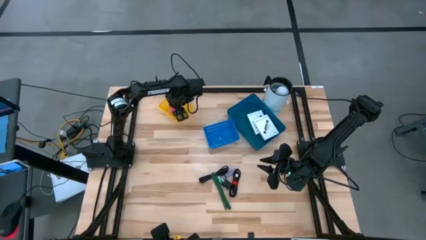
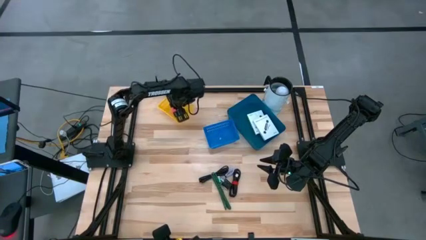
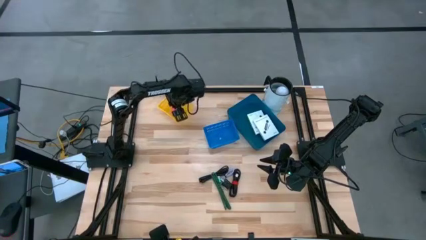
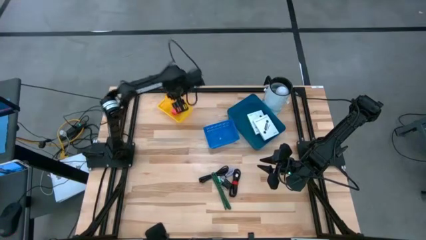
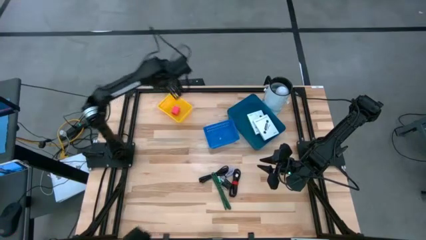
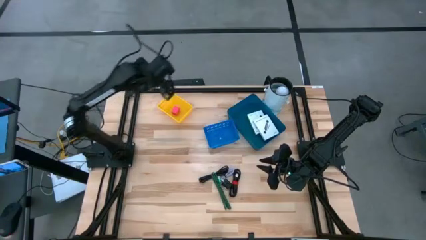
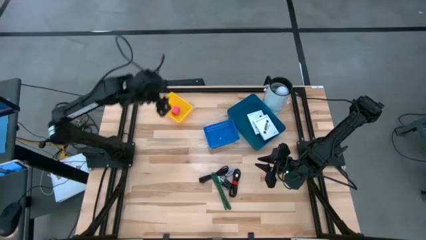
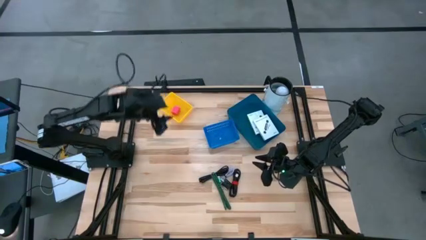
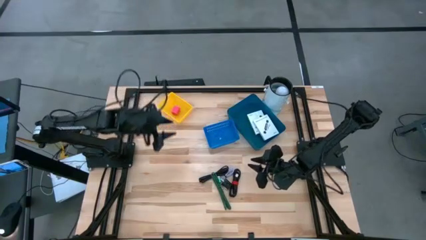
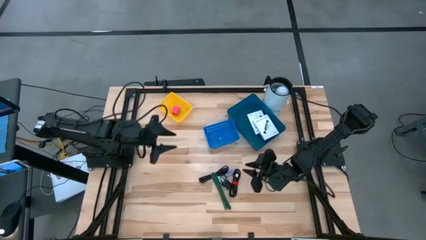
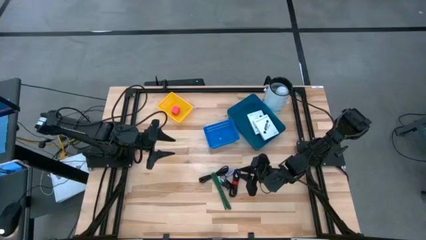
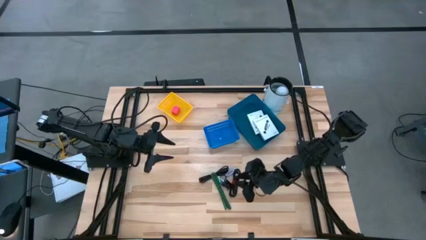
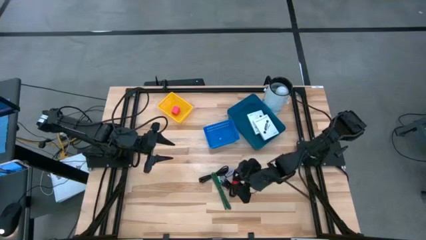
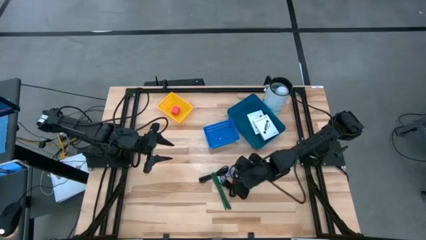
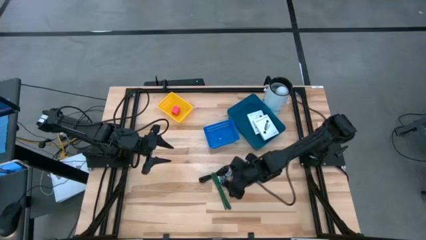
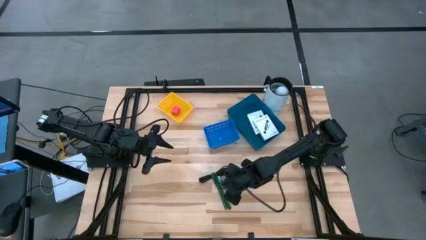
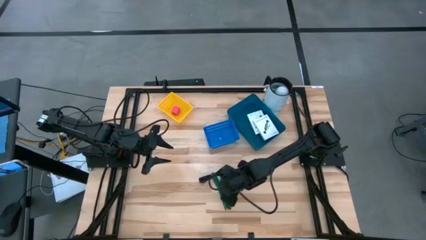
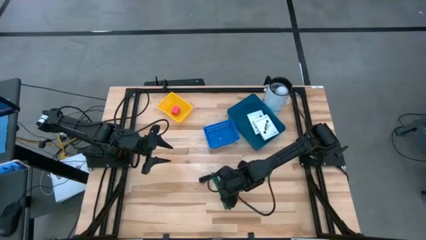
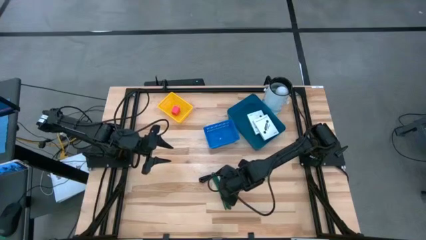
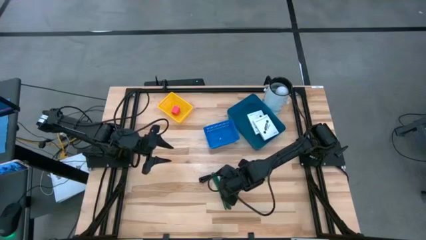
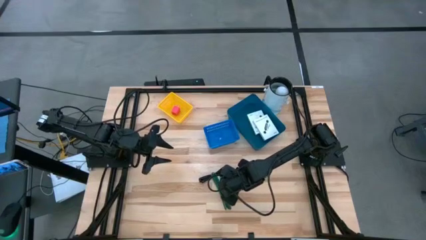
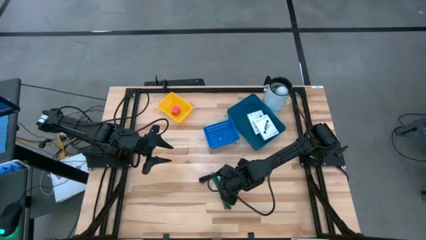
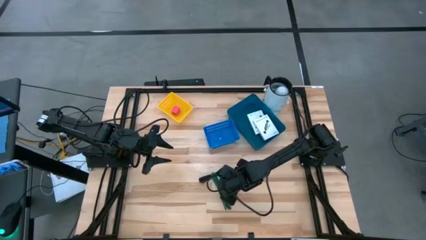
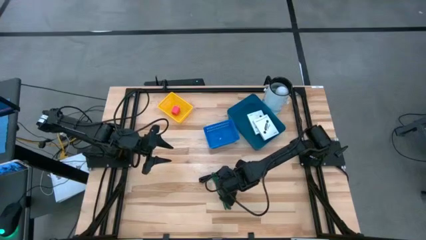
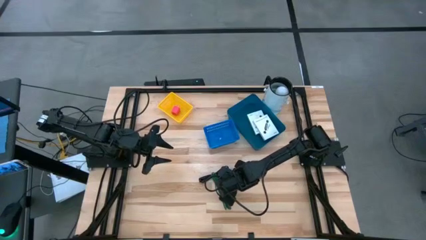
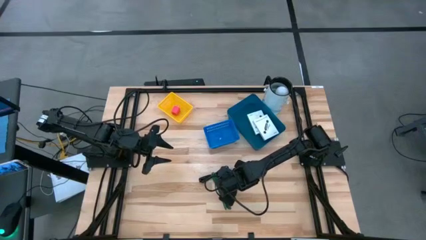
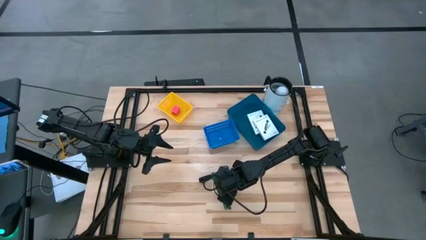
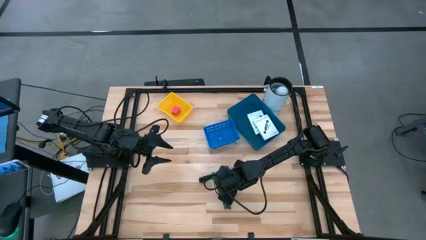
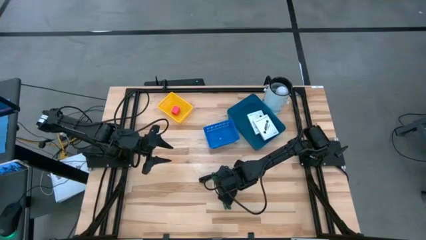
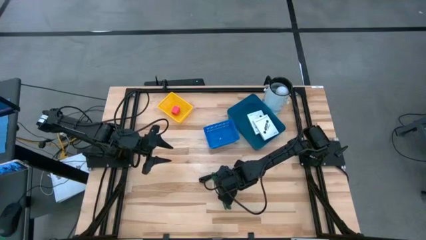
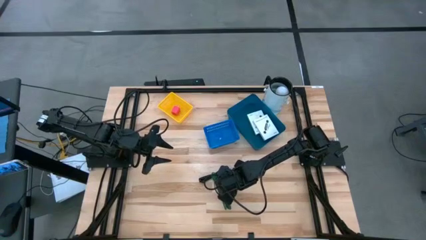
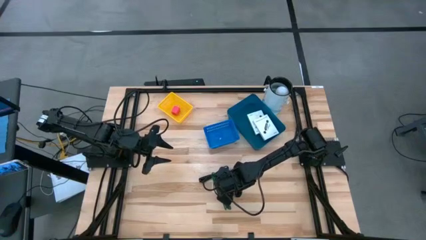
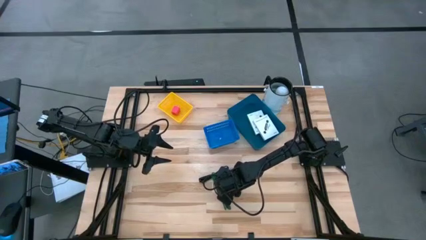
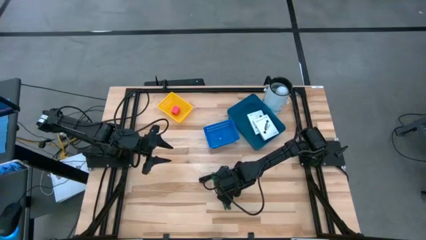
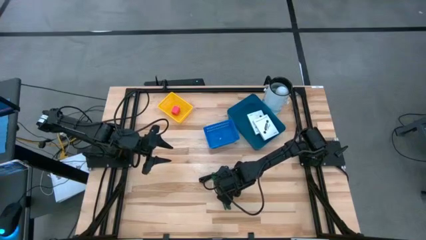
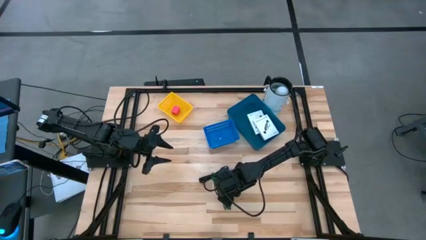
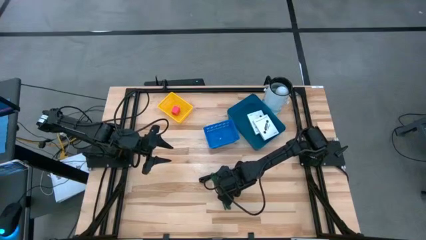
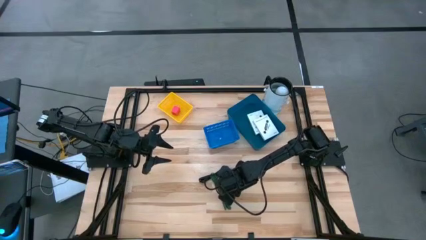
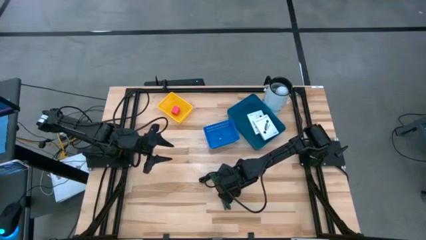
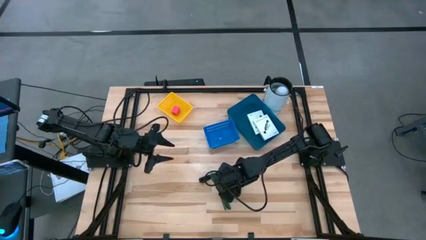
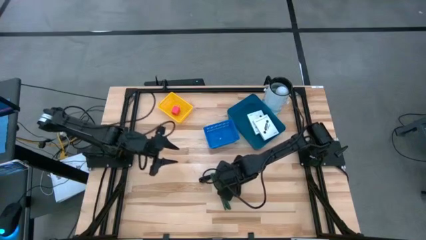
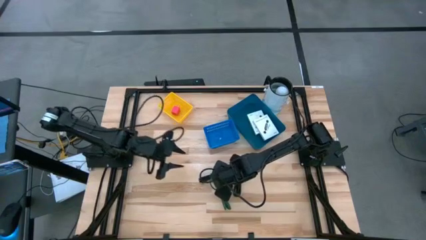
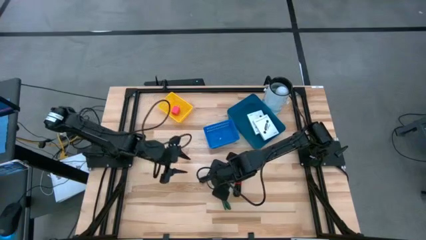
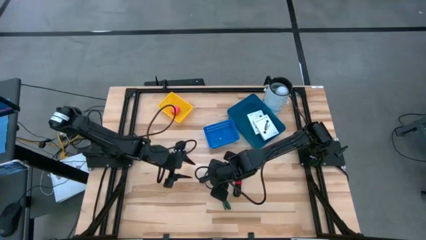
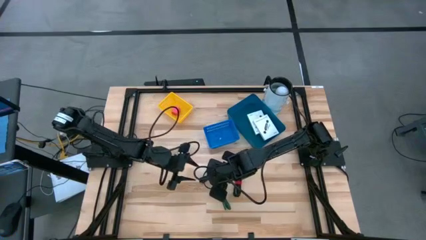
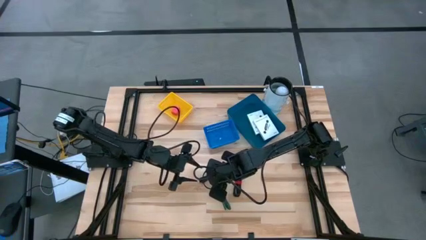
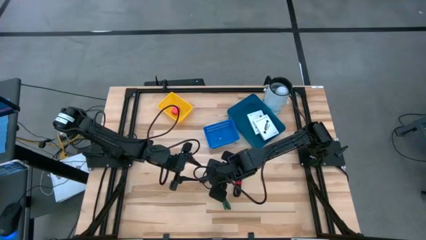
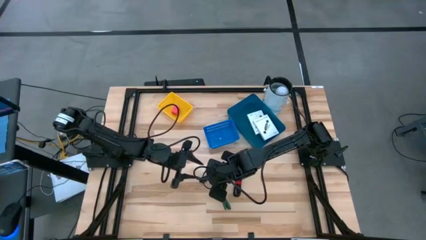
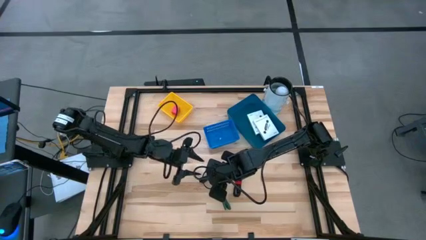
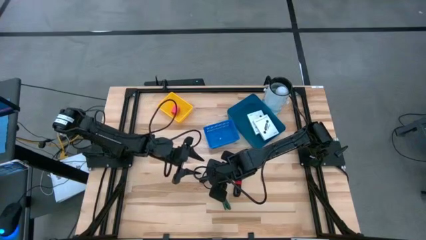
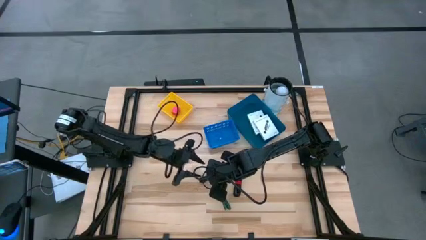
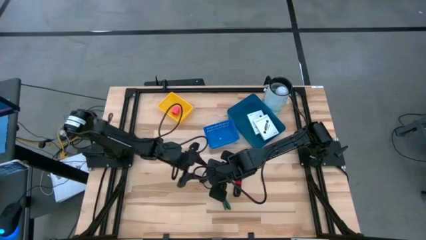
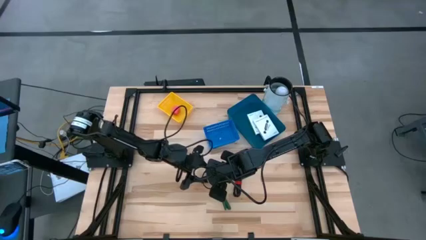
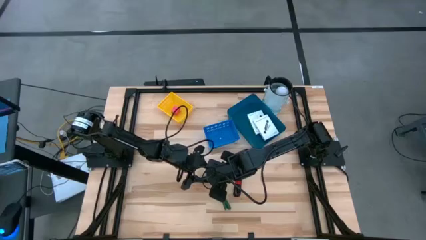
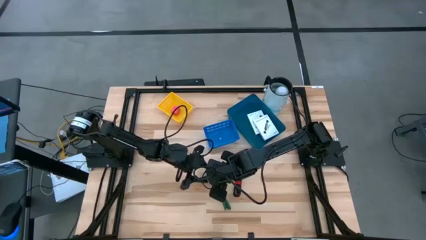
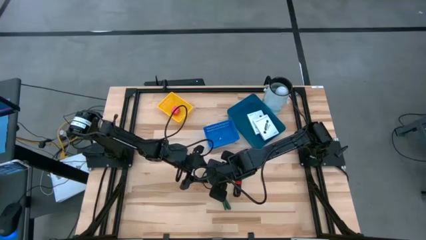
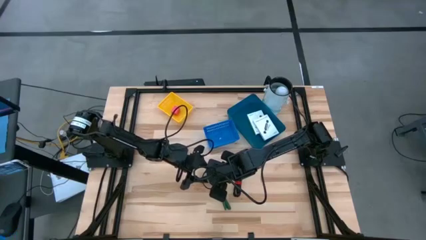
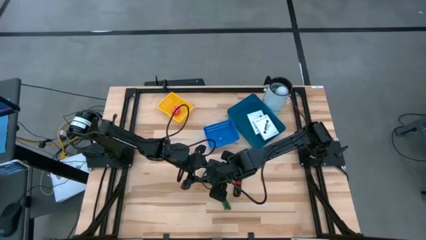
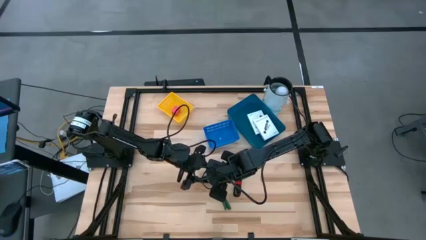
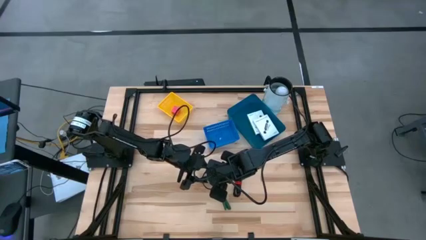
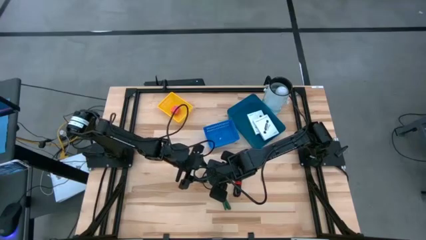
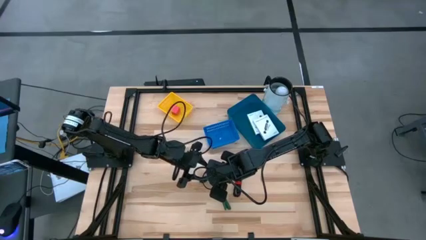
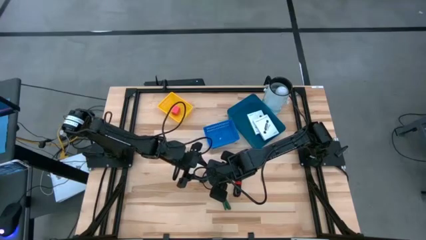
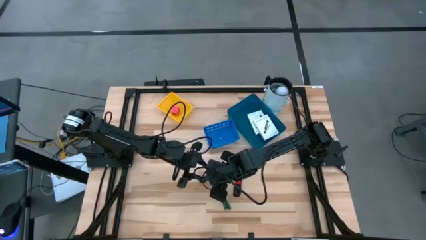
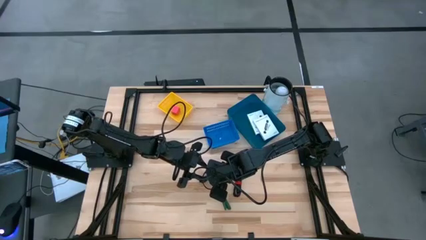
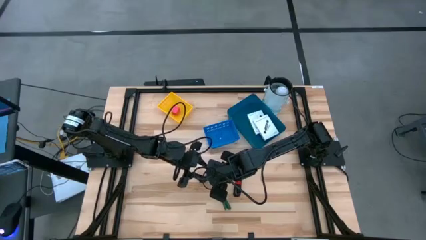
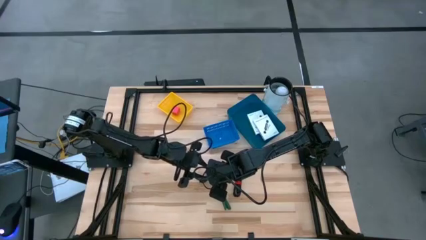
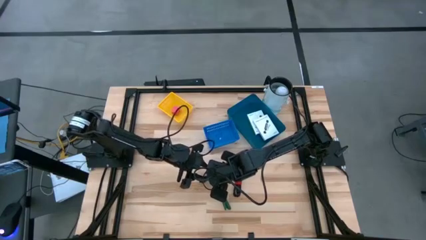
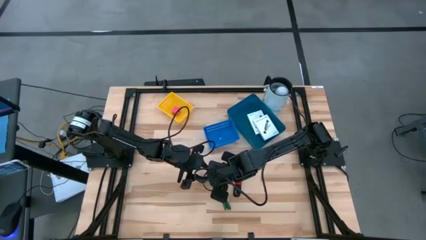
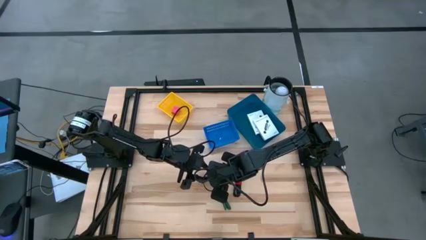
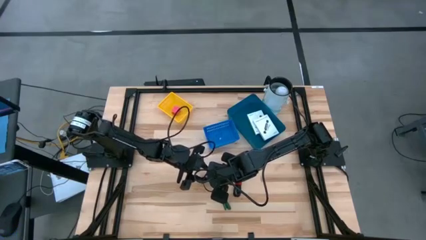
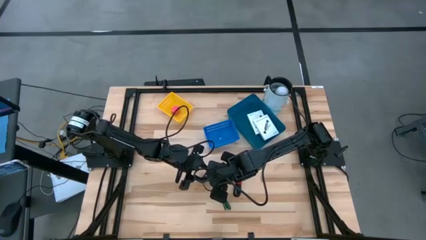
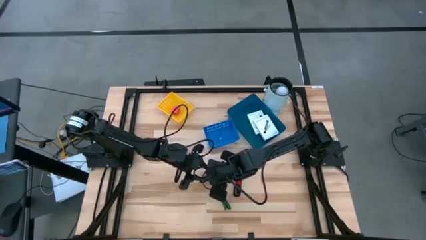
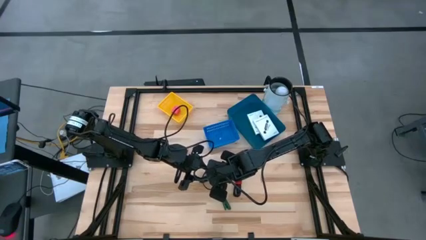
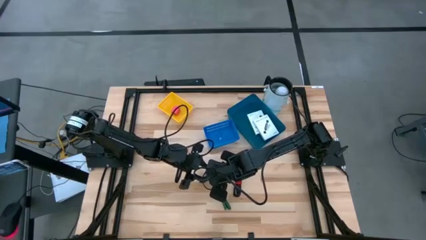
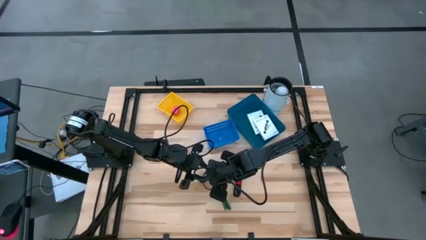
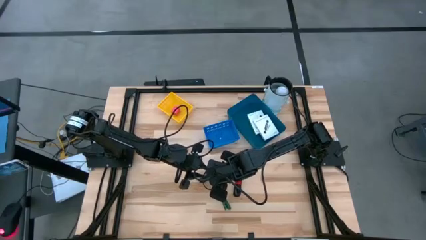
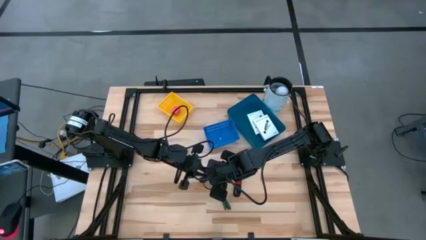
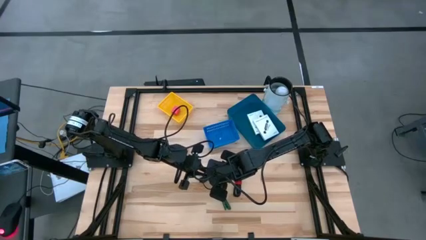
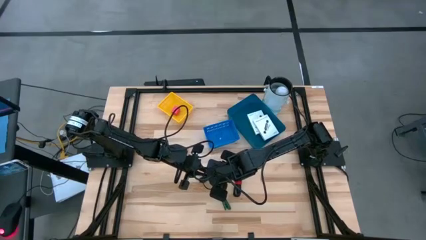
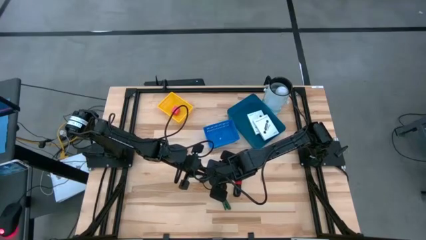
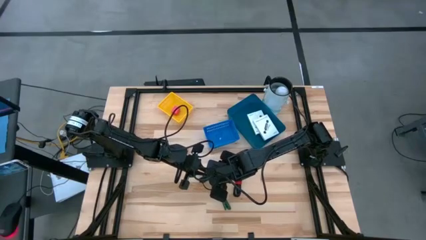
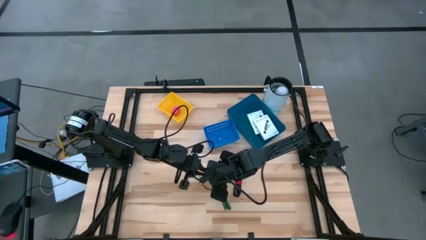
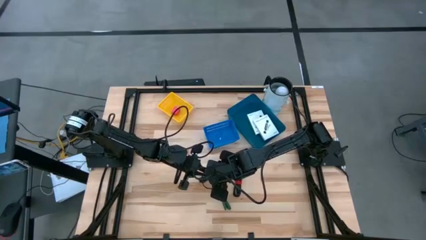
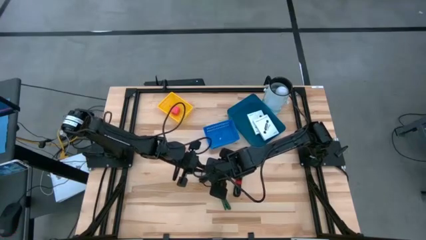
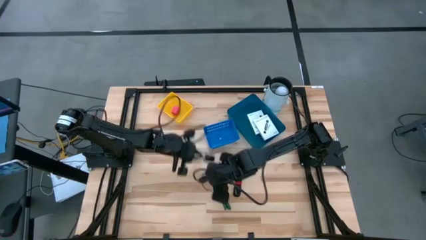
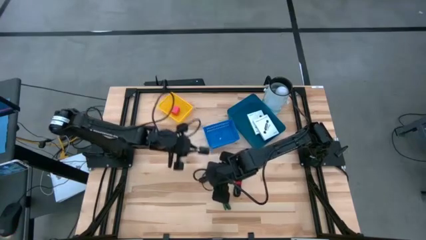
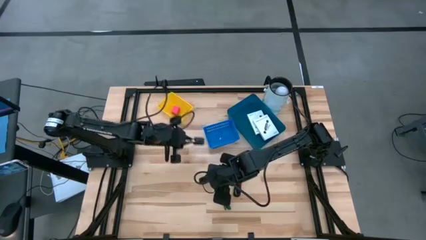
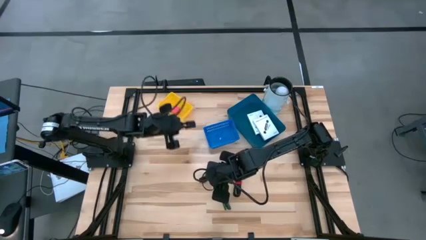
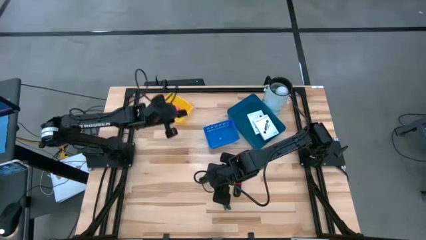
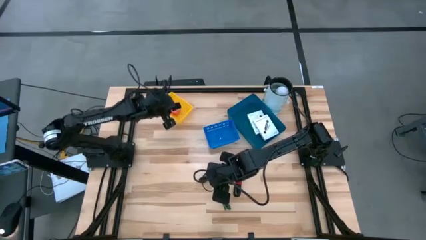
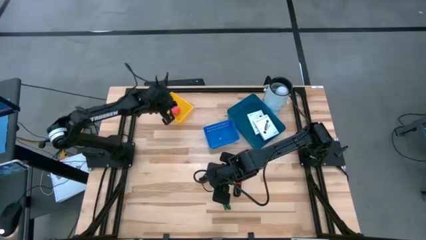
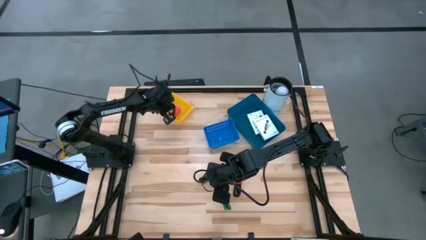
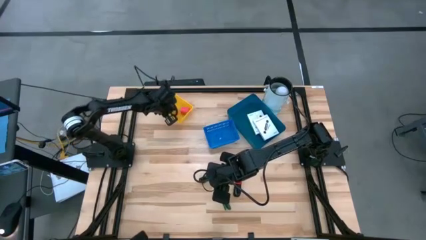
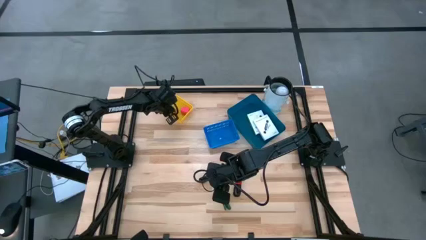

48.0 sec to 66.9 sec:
Task: Pick and place items into bin
Put the black charger adapter into the yellow bin
